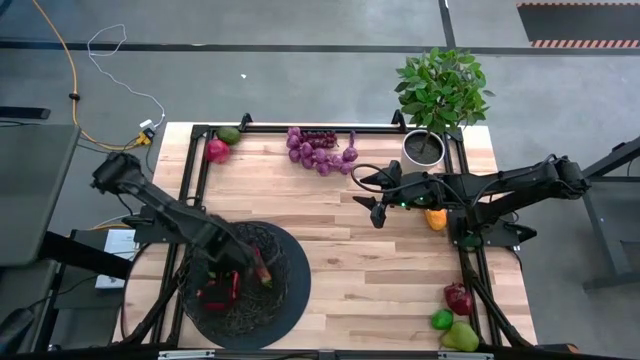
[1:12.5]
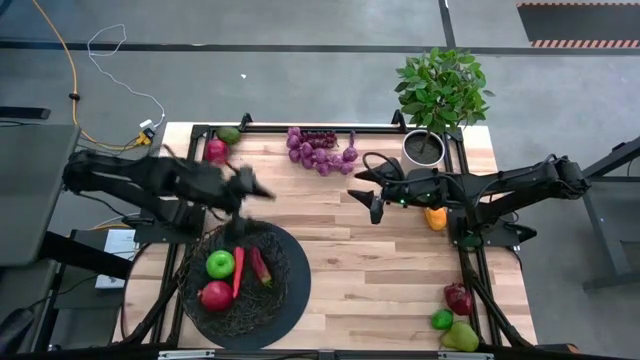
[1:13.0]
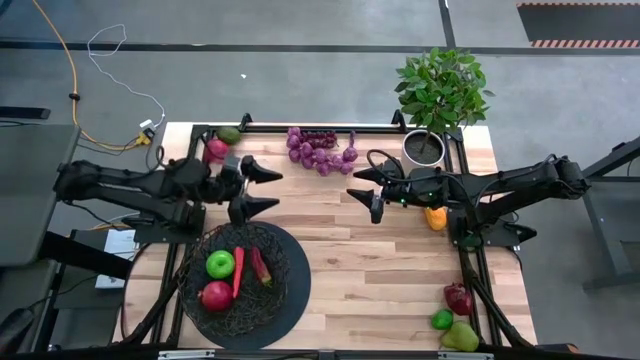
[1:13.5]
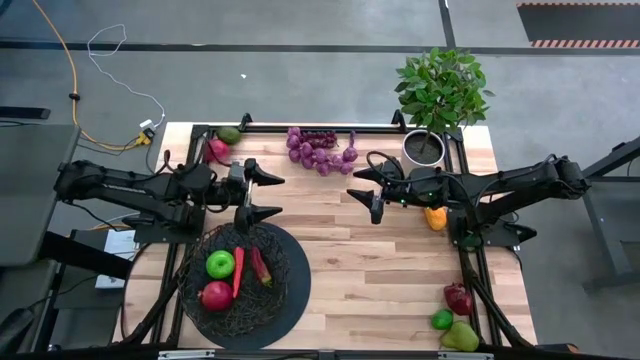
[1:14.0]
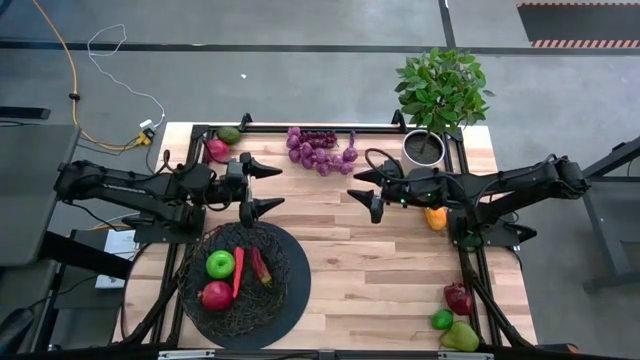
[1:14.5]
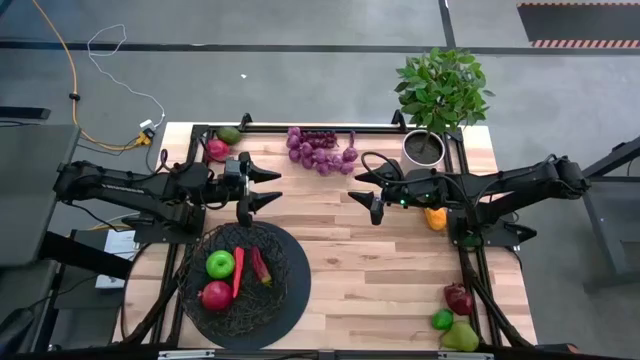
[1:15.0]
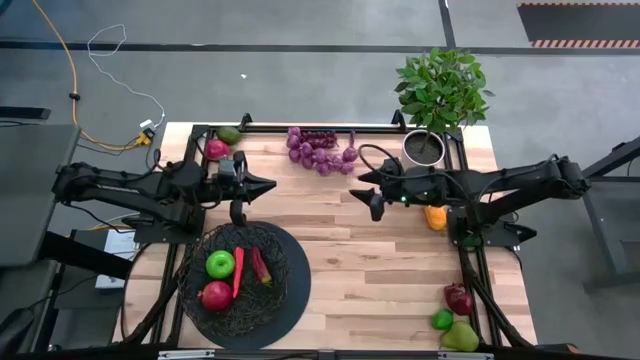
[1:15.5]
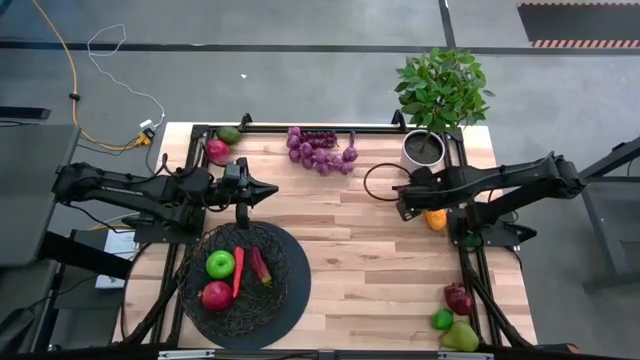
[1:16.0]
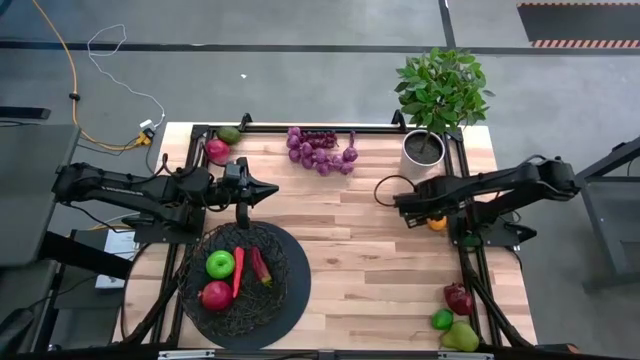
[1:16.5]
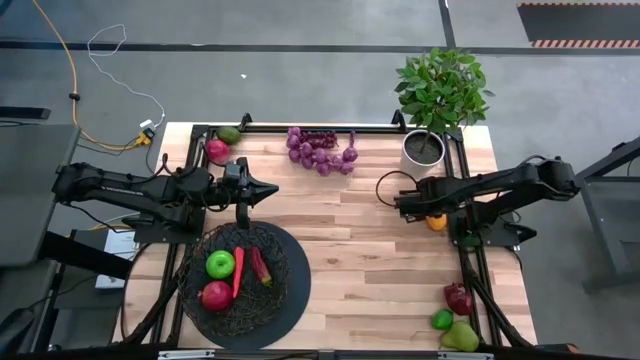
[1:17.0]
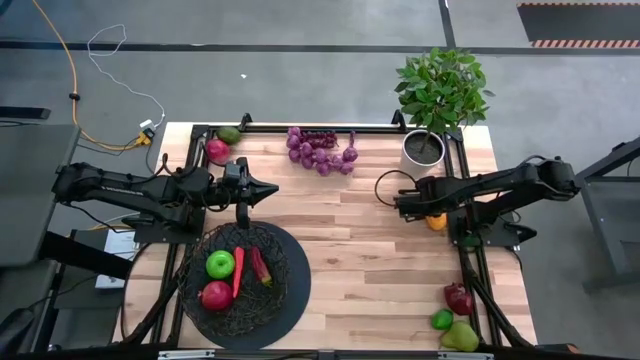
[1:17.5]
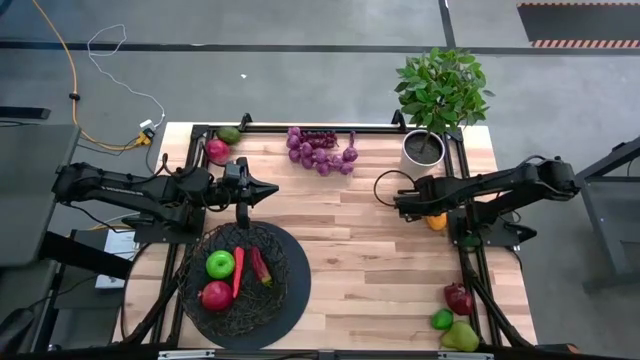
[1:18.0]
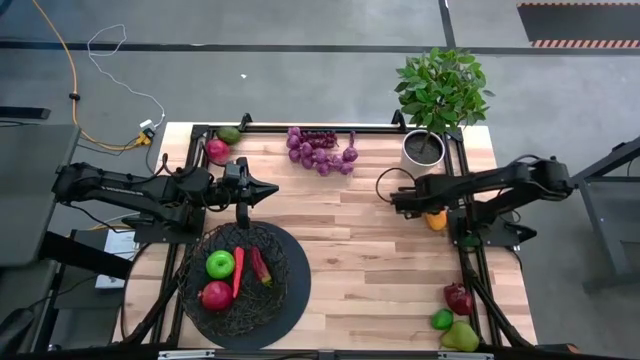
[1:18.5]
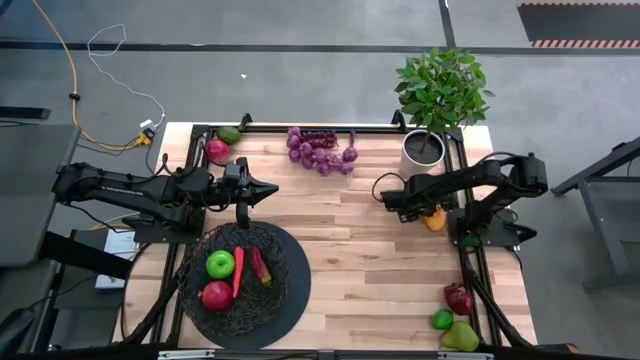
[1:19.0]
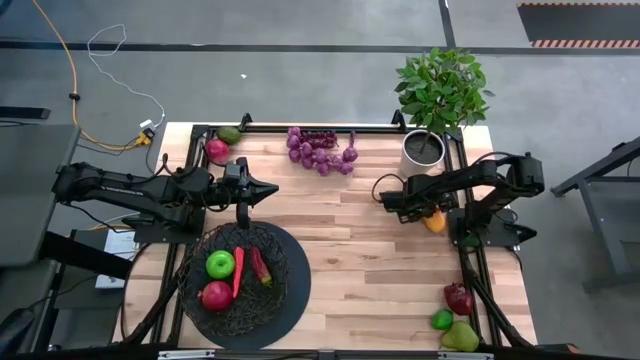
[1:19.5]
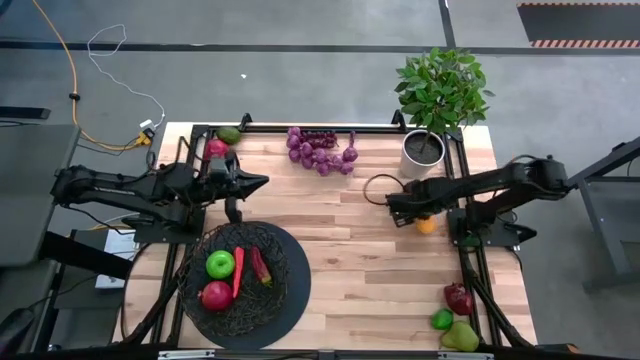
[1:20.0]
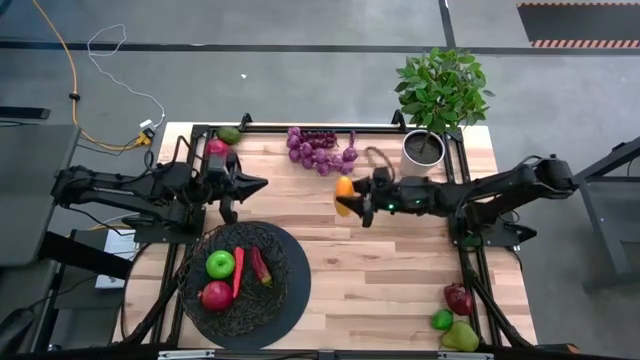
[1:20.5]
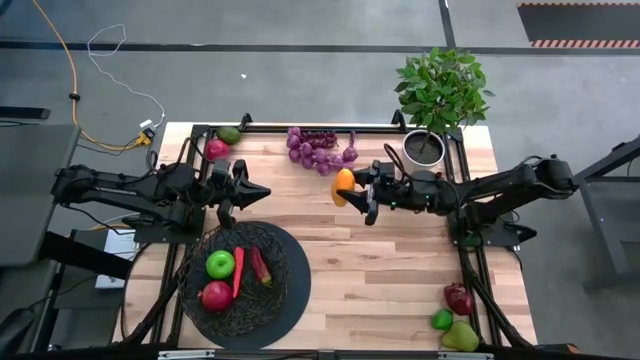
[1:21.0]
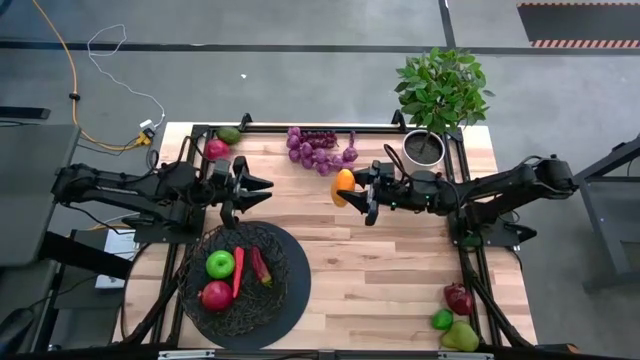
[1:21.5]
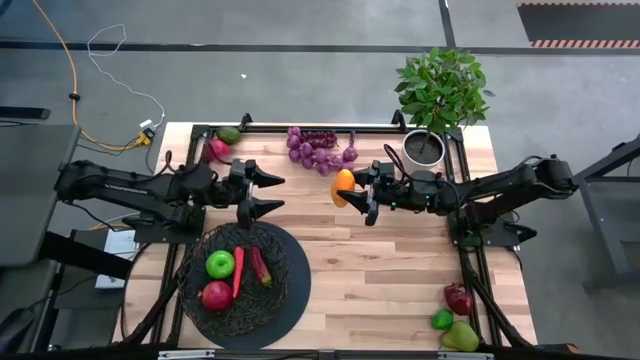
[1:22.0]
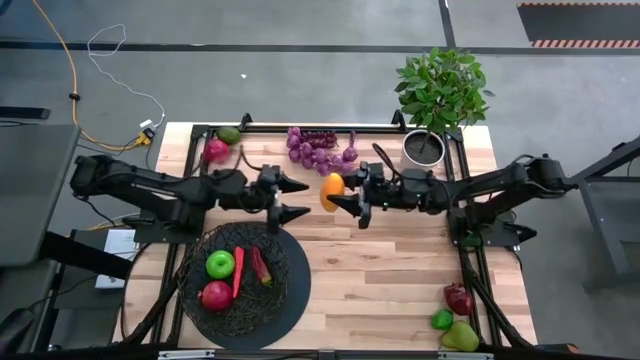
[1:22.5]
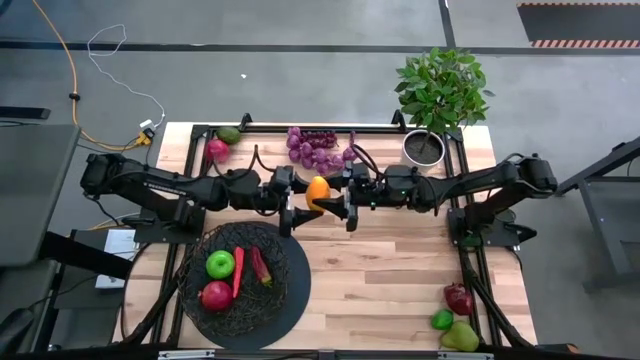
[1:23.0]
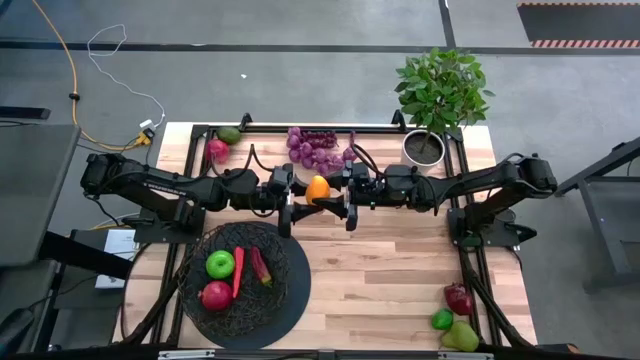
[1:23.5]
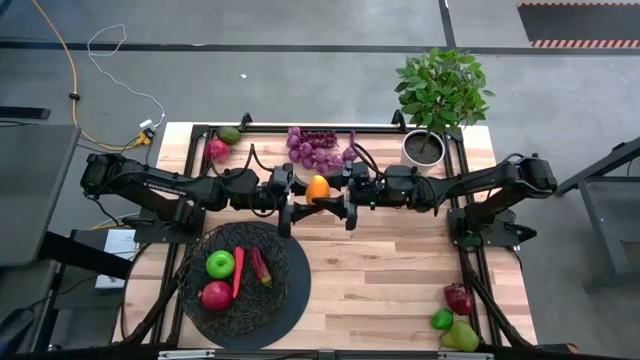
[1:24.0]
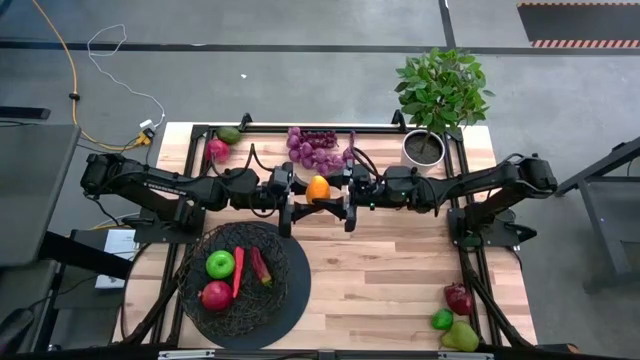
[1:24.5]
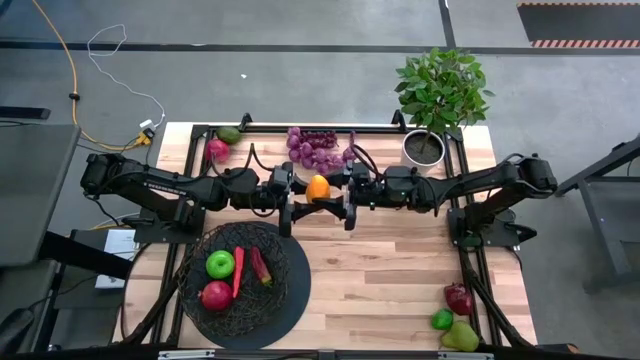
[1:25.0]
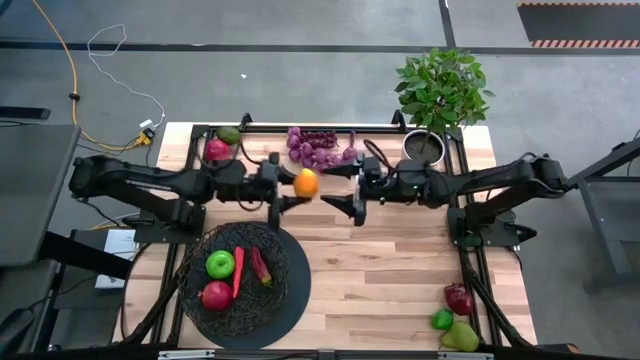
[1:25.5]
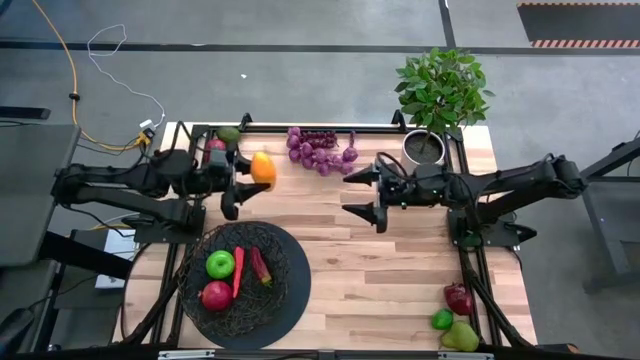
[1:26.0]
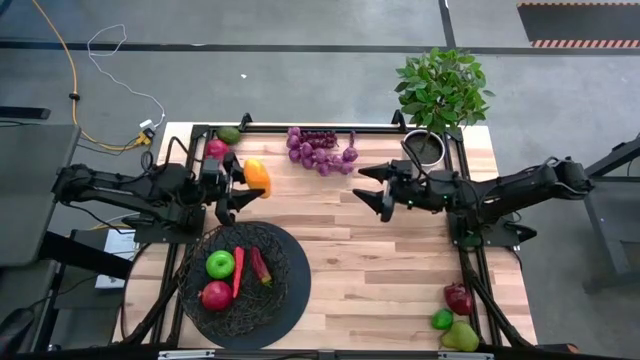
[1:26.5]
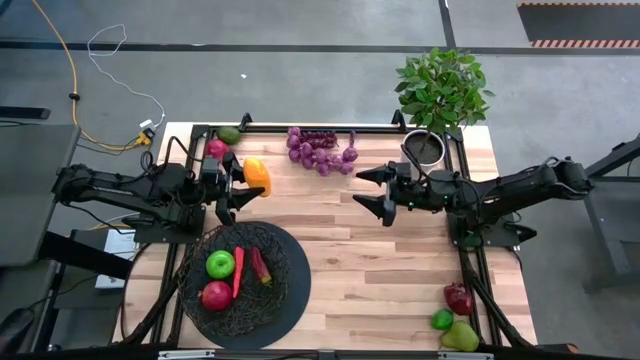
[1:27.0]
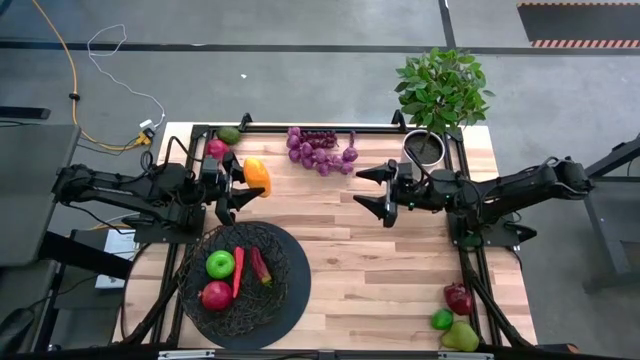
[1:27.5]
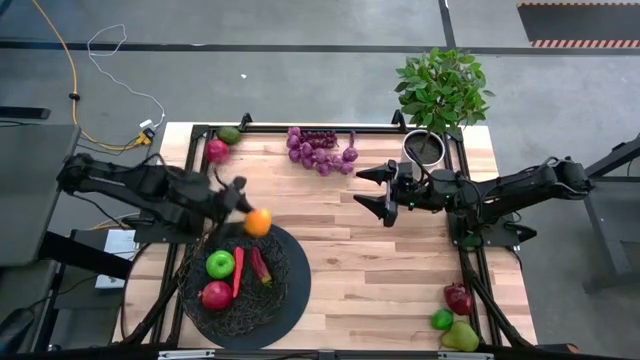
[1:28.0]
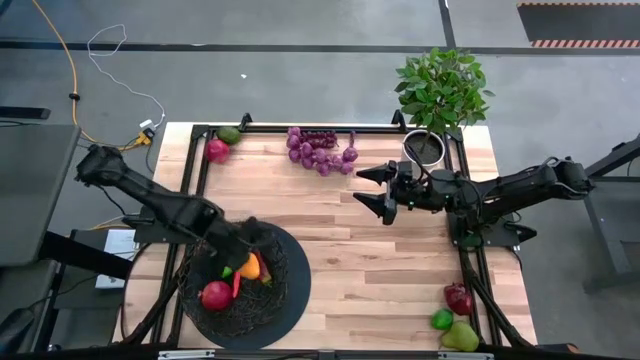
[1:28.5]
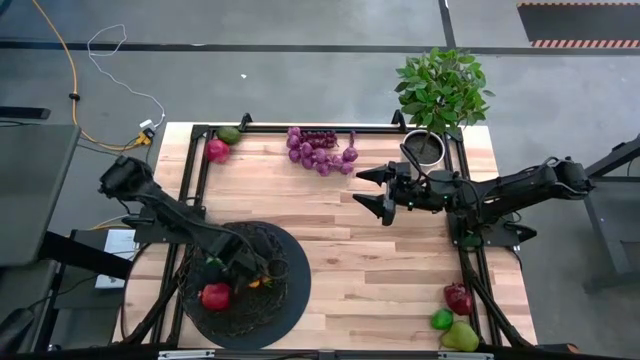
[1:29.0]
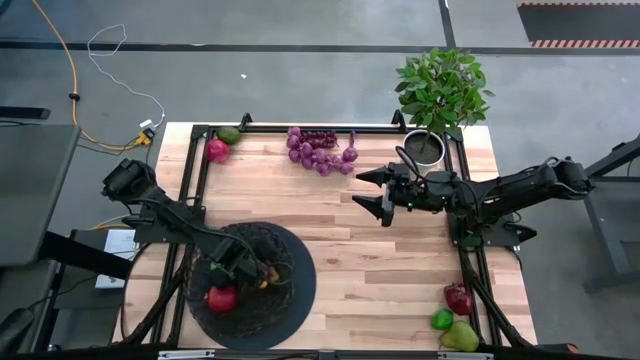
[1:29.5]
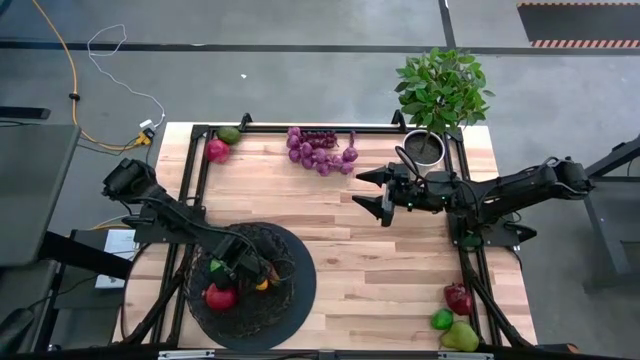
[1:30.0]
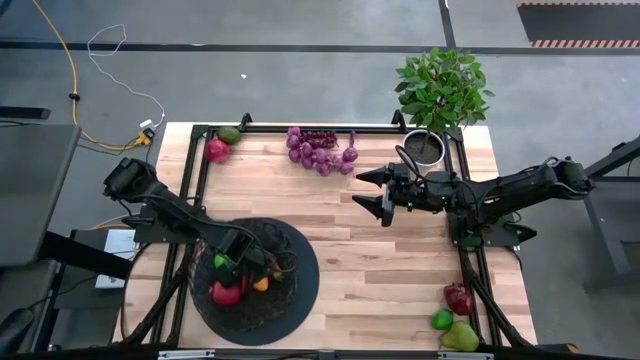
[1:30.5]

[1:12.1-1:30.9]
Task: Build produce basket
Put the mango into the black basket

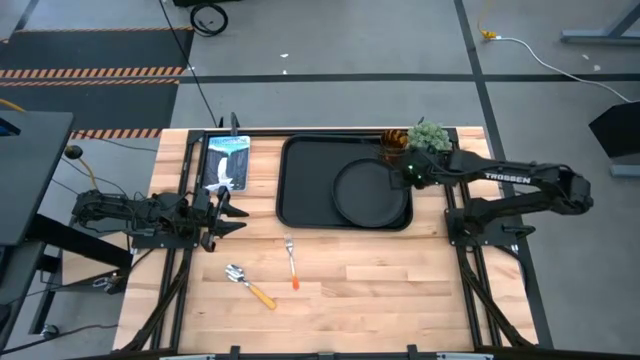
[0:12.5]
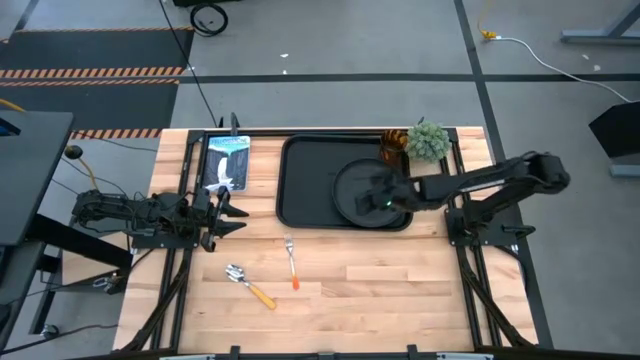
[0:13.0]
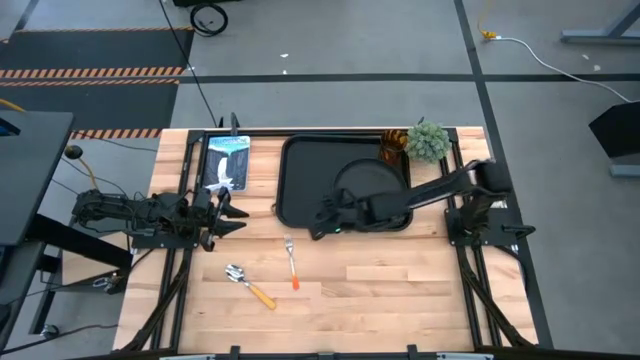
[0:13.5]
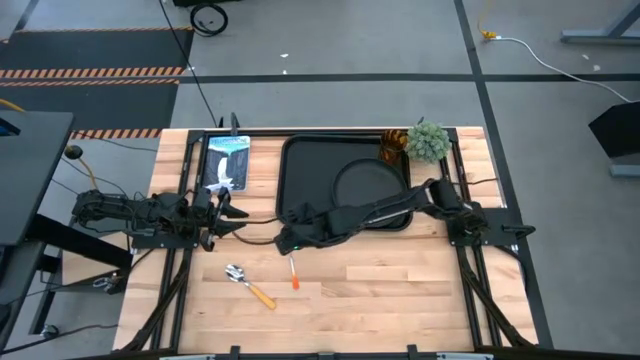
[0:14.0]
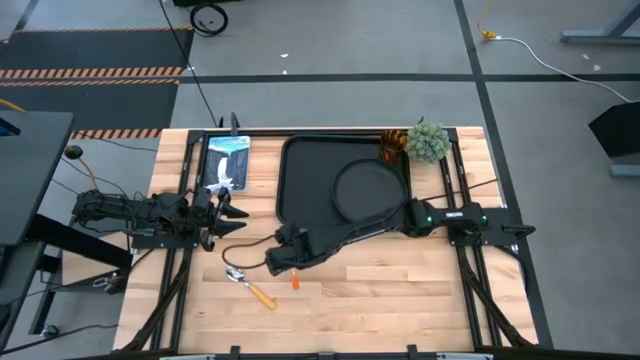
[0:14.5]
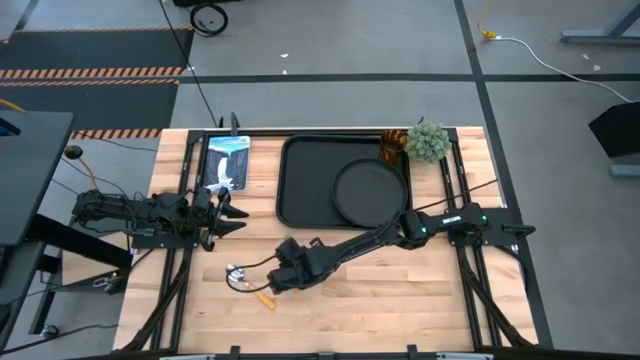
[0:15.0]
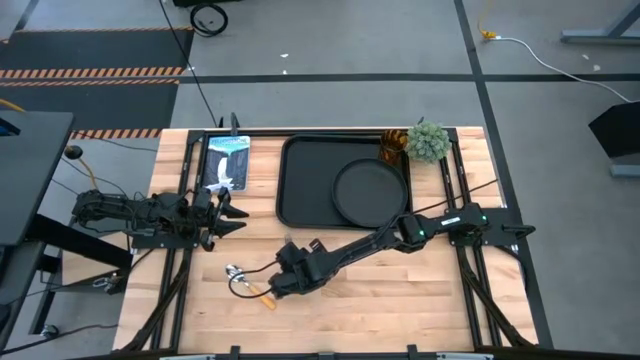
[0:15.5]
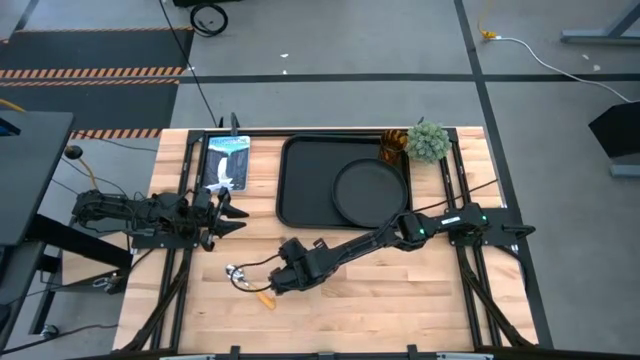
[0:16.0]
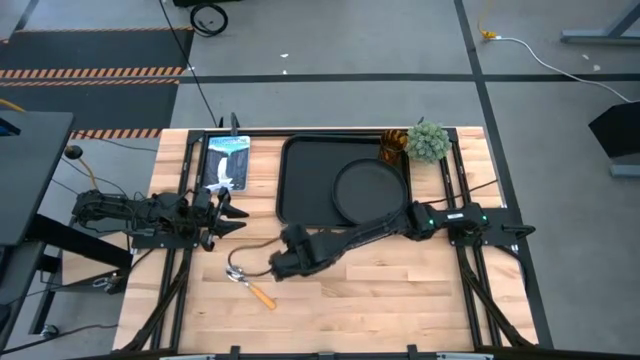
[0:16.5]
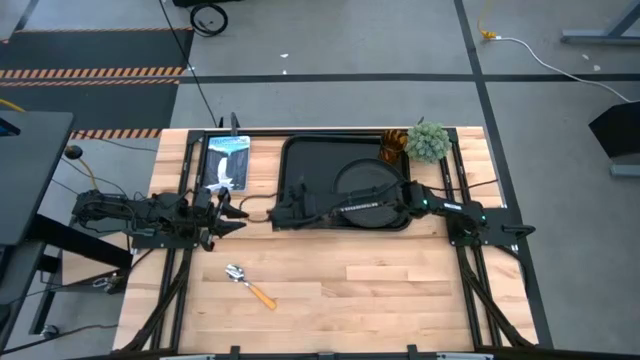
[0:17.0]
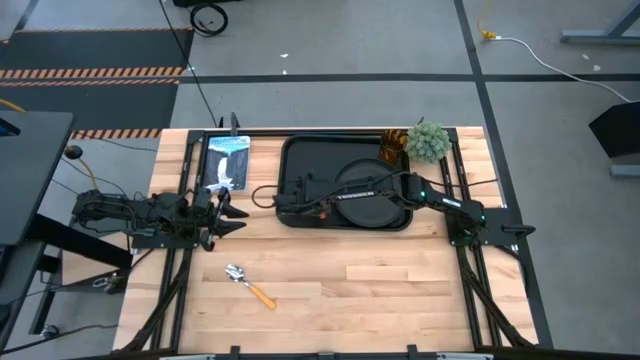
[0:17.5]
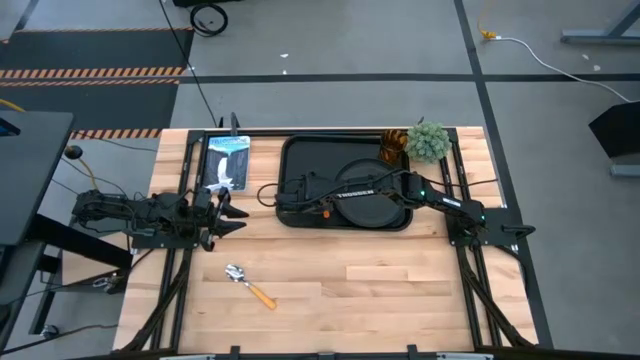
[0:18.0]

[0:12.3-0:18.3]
Task: Pick and place plate/cup/fork/spoon on tray
Put the orange fork on the black tray to the left of the black plate
